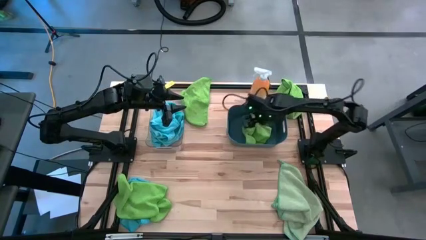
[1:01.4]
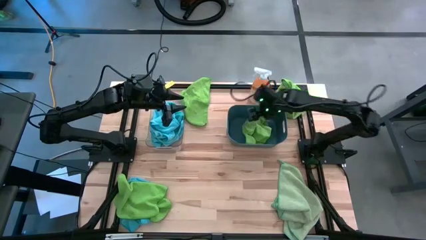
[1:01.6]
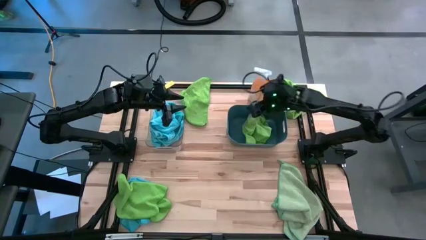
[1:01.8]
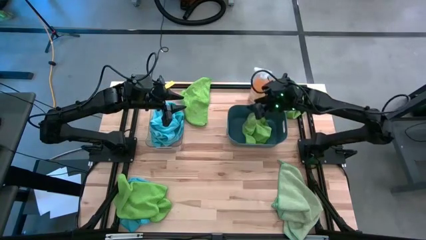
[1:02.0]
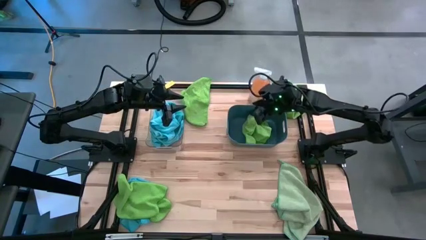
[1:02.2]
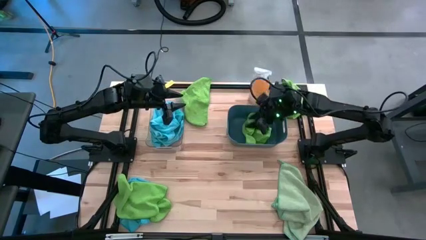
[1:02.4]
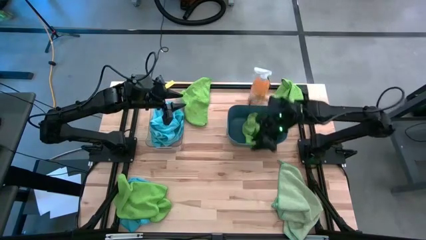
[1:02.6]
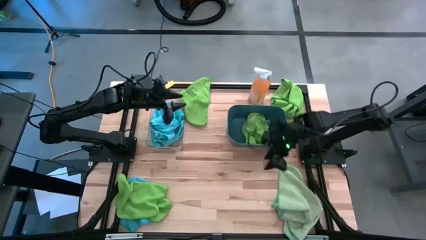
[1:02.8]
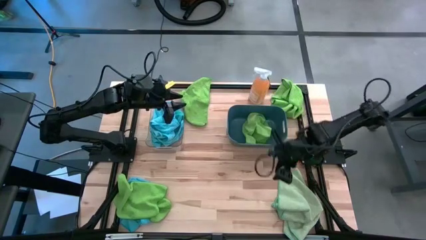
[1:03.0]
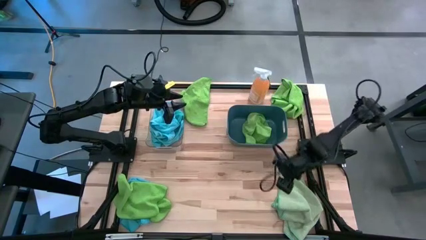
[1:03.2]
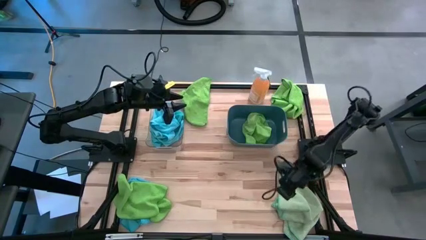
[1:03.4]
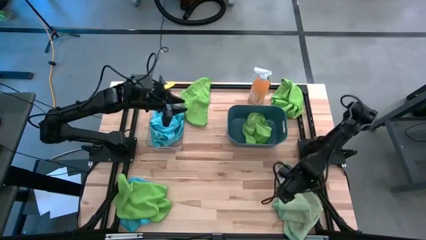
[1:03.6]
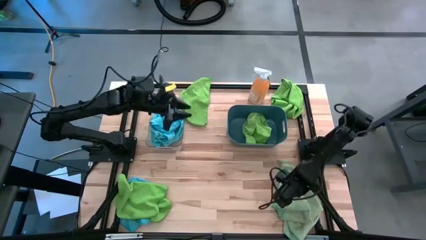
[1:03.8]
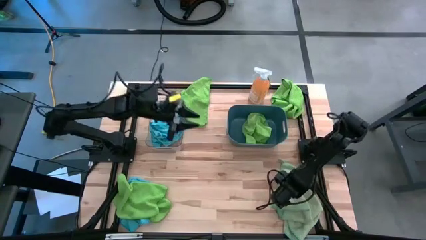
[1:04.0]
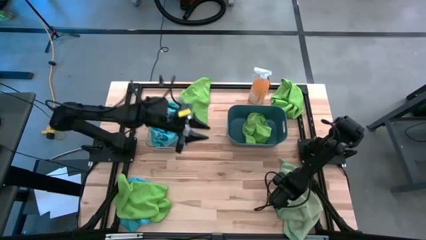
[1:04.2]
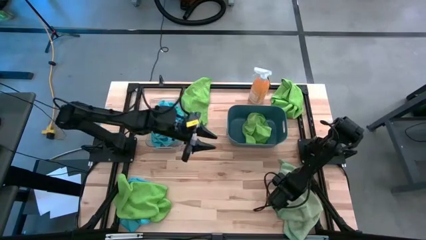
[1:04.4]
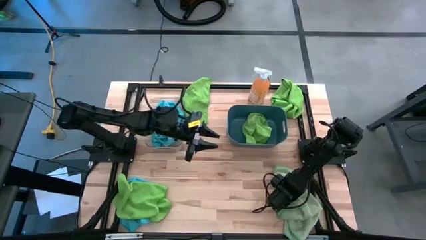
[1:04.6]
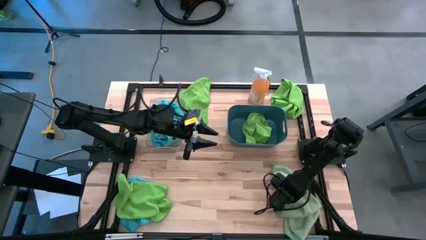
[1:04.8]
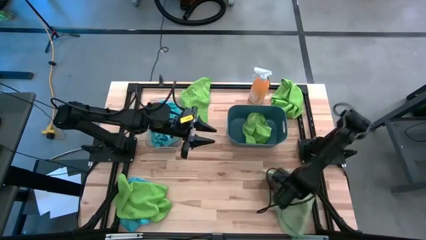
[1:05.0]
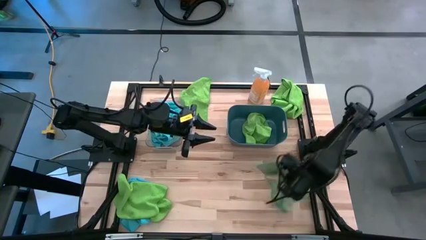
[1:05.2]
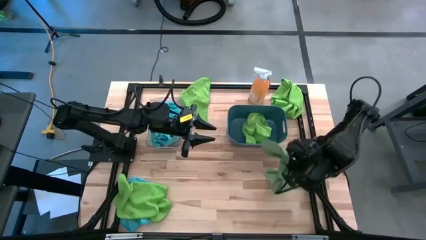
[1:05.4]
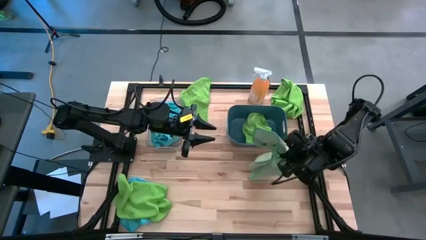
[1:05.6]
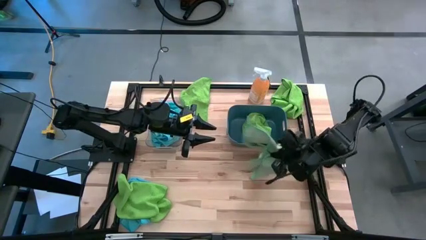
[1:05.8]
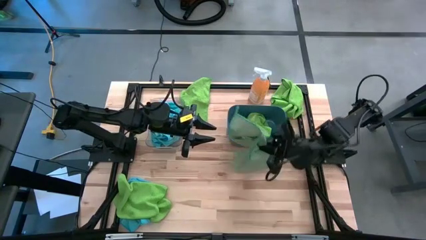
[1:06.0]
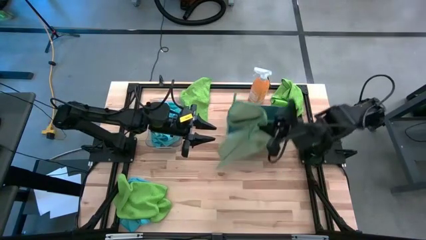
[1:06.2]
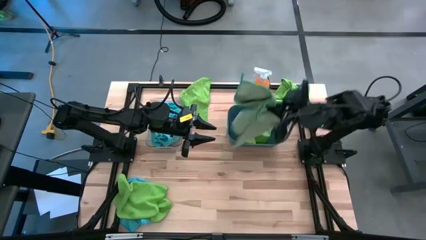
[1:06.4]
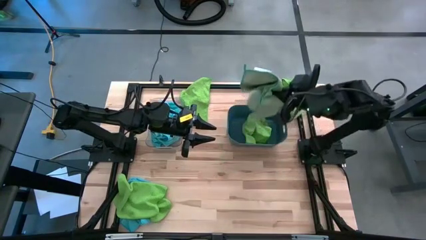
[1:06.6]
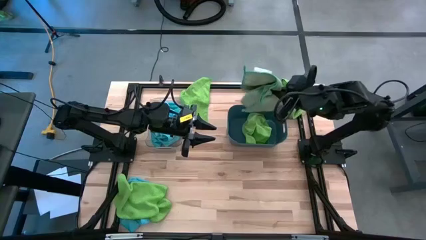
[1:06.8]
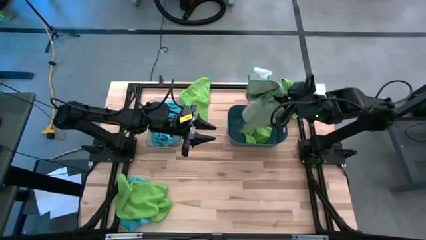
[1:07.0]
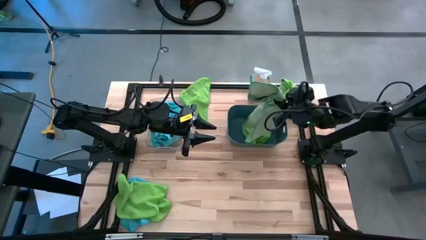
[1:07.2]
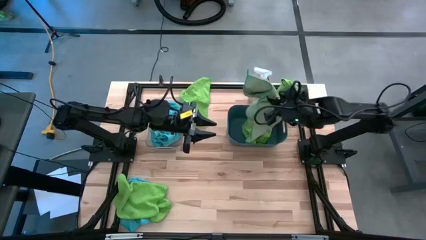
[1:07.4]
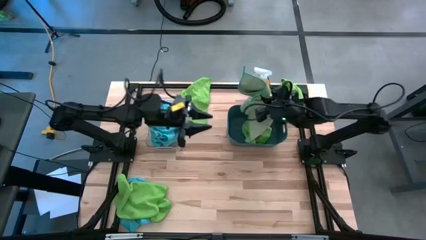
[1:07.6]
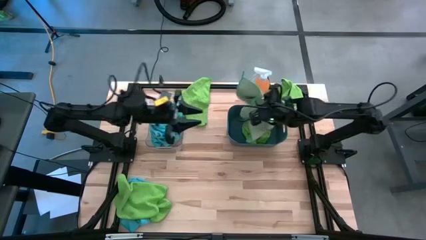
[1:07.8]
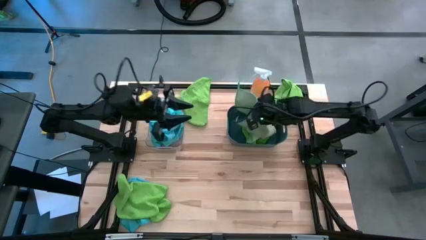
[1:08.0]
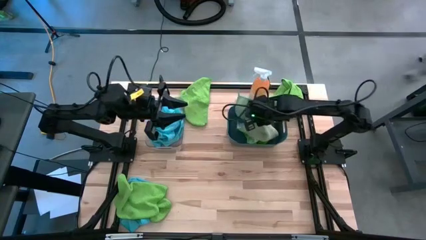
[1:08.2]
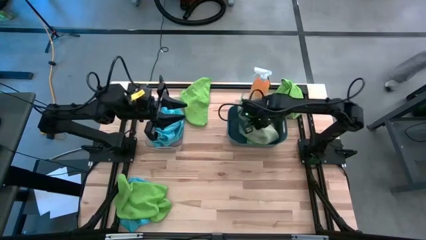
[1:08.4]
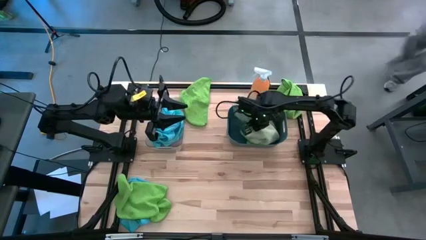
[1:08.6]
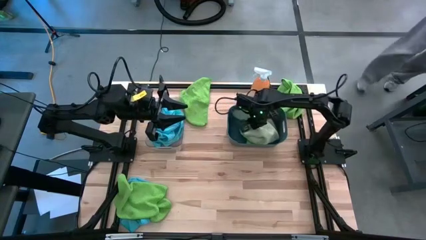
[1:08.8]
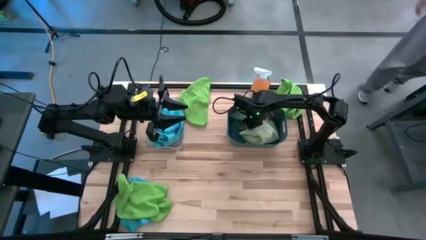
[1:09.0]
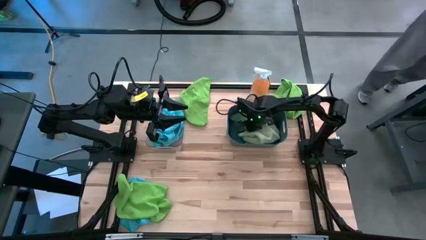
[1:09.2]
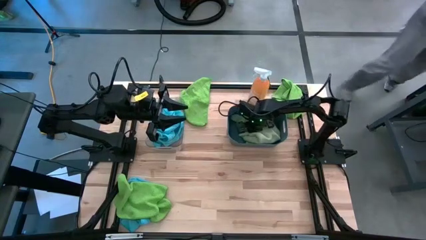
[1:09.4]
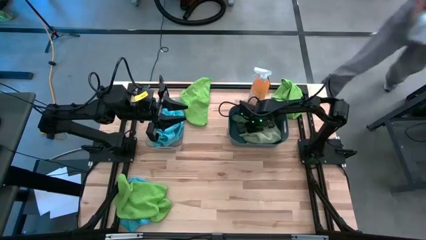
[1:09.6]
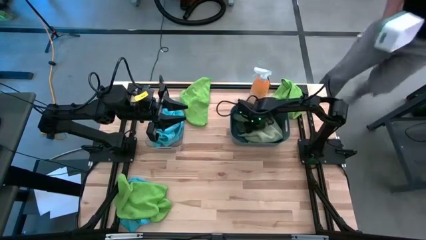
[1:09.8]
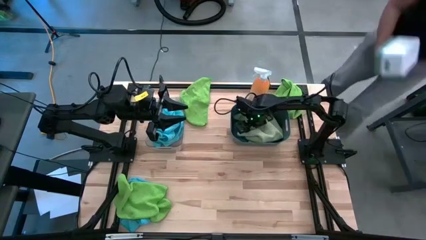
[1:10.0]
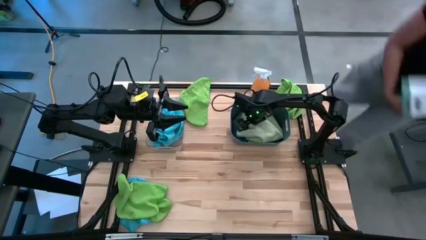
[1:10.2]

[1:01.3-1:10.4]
Task: Sort microfiber towel by color & place in baskets
Put the green microfiber towel into the blue bin

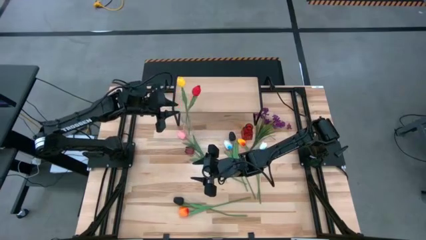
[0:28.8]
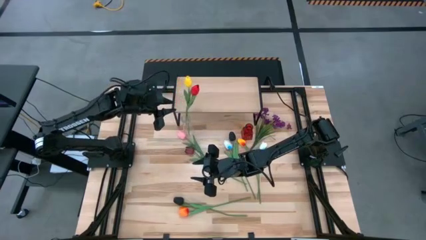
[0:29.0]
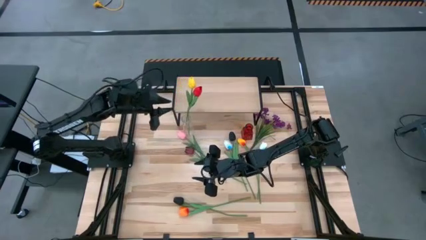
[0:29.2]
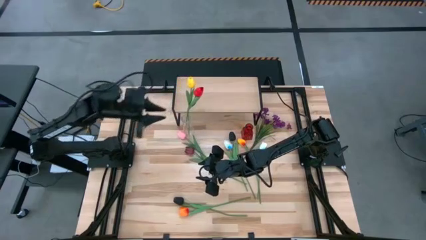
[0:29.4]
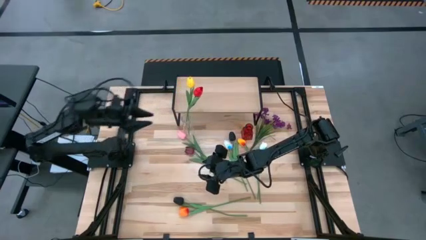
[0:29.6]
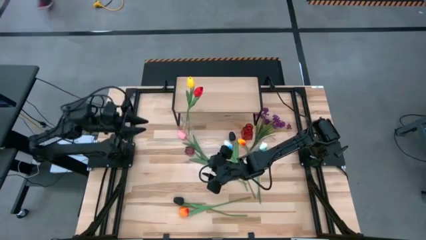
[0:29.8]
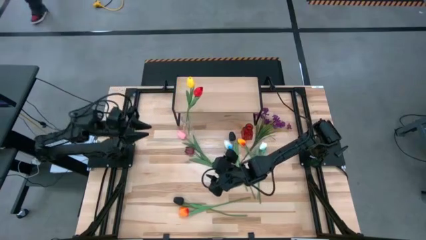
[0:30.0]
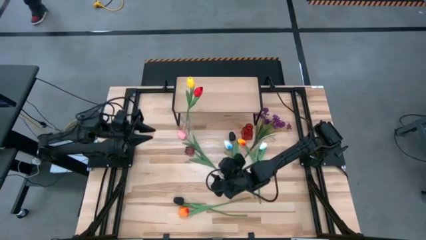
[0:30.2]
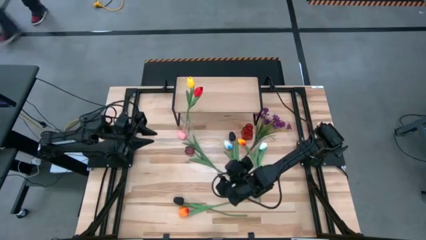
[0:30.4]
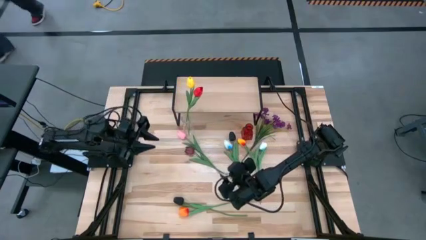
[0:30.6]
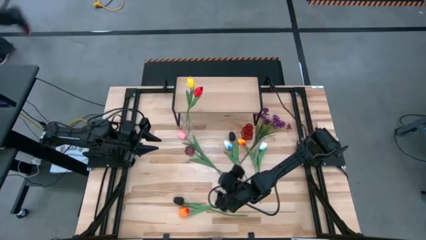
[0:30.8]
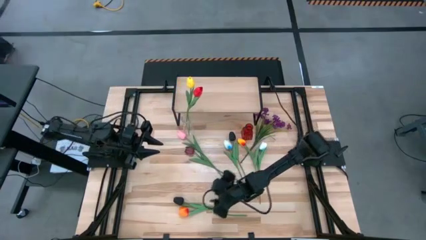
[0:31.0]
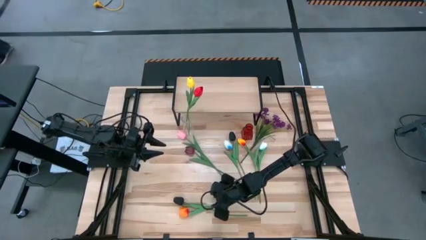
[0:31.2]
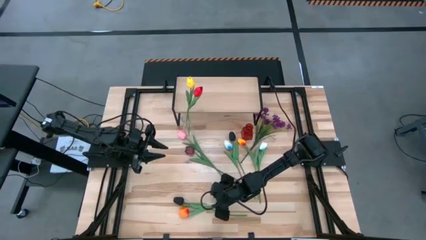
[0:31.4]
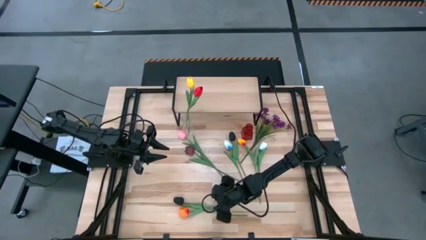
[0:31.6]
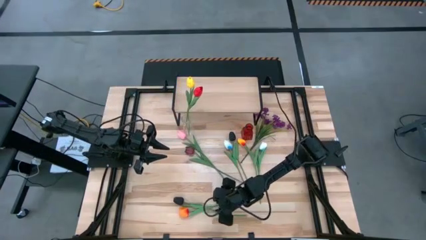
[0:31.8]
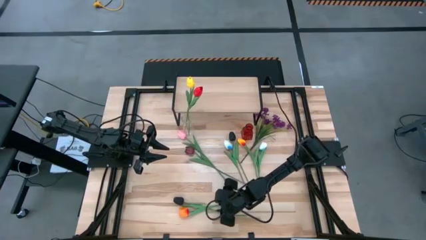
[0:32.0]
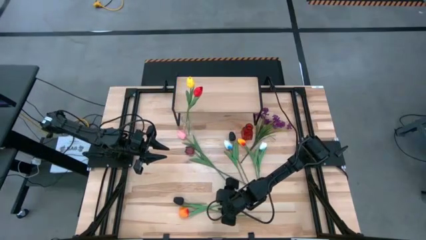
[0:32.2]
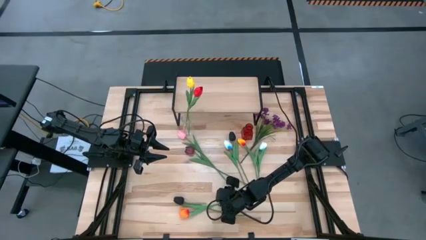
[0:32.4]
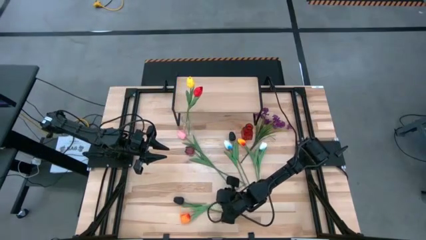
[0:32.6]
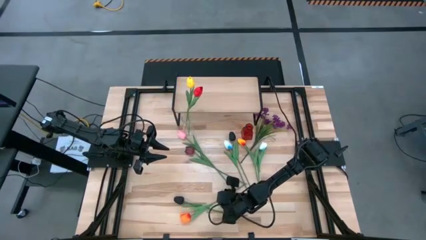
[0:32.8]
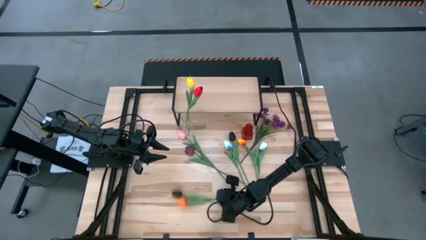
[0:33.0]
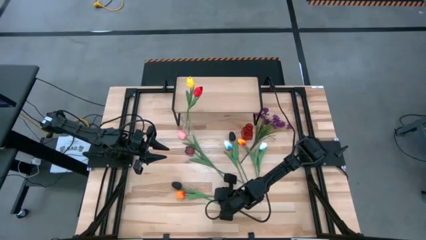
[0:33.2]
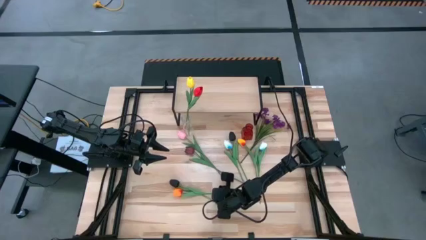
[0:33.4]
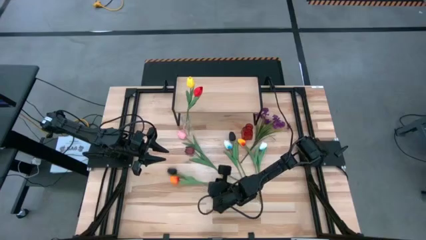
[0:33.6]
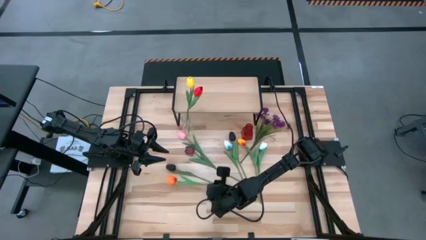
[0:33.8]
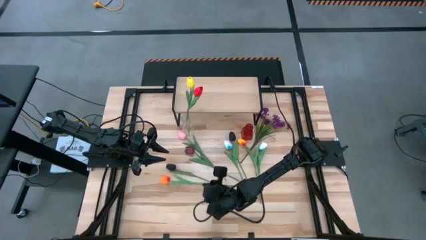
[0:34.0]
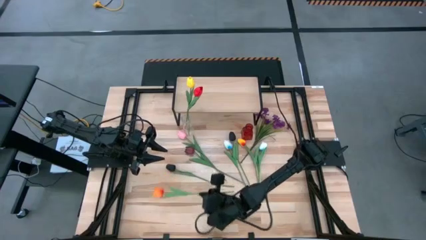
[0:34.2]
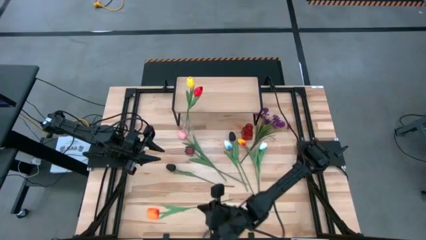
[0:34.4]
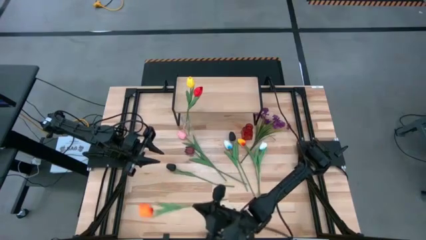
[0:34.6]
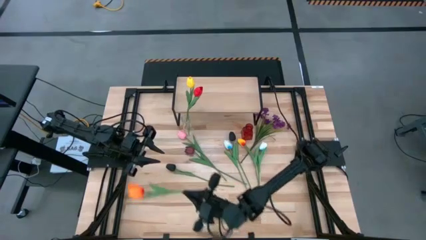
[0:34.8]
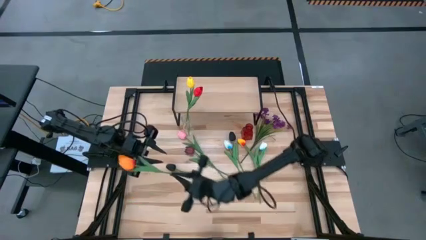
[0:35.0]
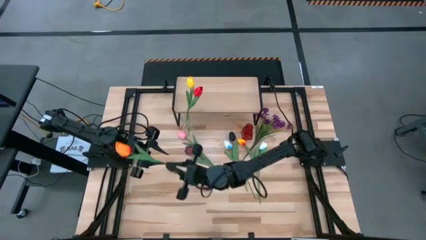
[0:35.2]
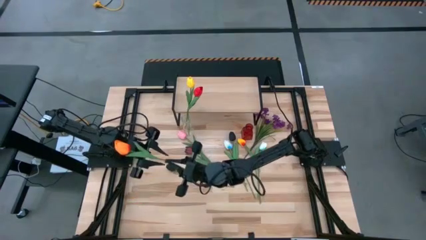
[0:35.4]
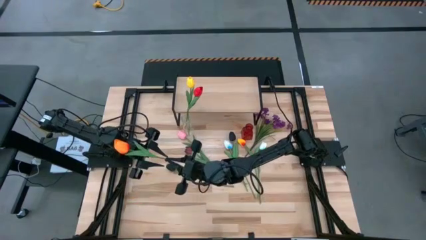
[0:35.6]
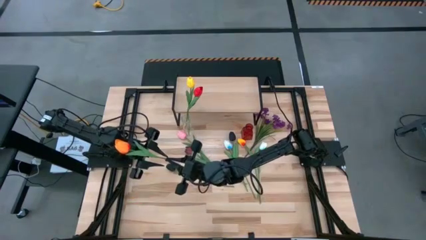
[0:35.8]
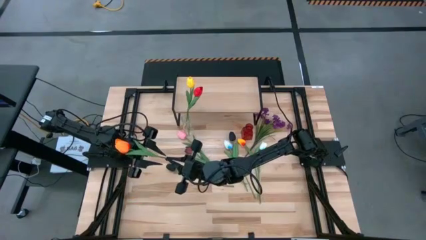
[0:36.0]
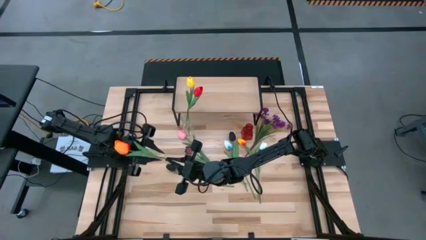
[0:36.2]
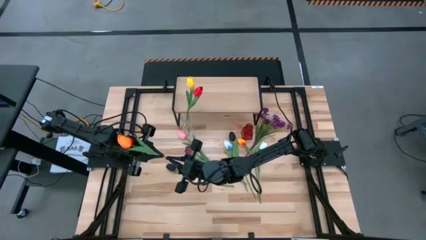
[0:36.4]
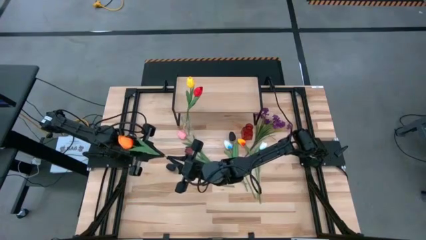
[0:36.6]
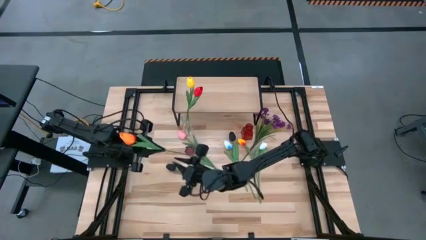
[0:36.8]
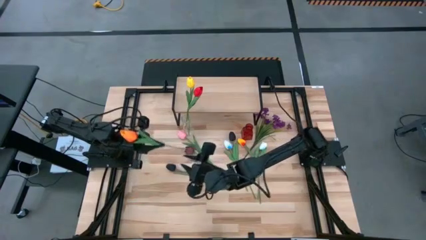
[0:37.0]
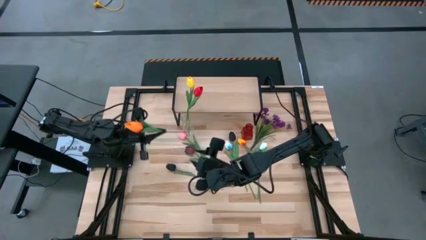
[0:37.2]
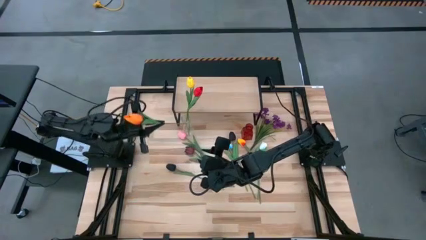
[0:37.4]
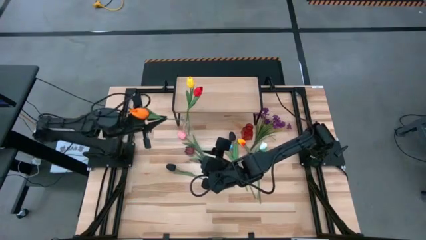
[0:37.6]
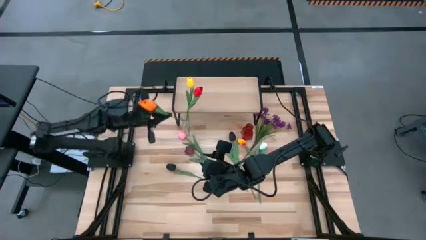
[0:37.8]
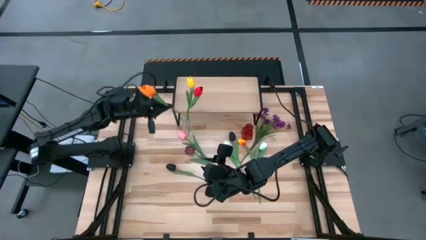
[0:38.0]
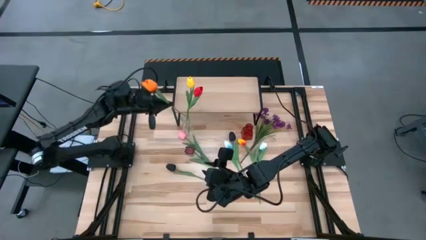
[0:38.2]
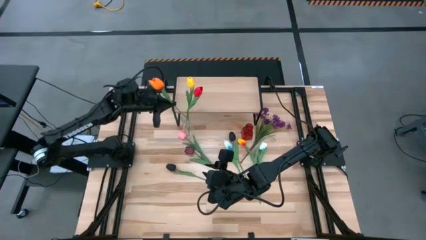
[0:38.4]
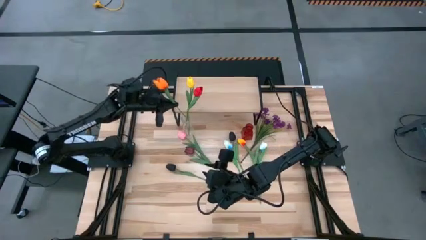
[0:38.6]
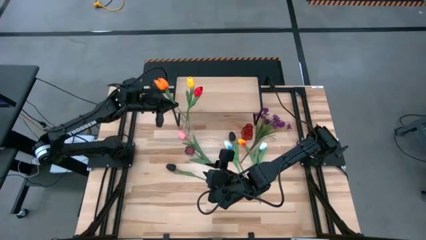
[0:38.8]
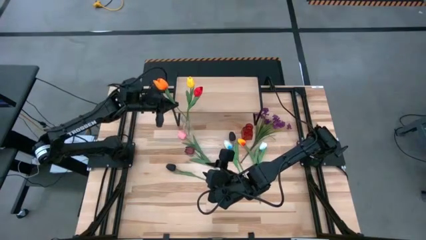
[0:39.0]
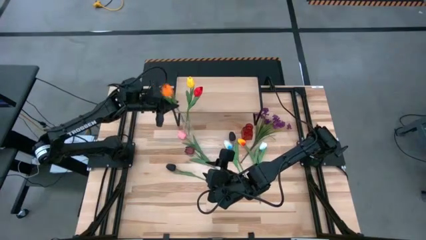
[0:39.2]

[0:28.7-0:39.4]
Task: Pick and place flowers into a vace then onto a shelf
Put the left orange flower into the transparent vase
